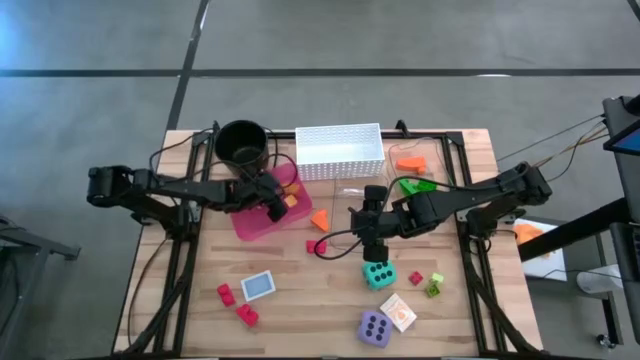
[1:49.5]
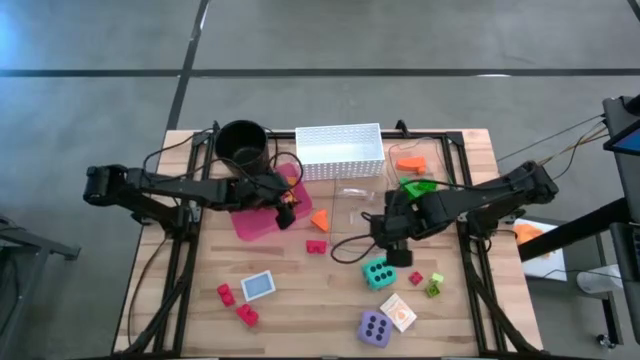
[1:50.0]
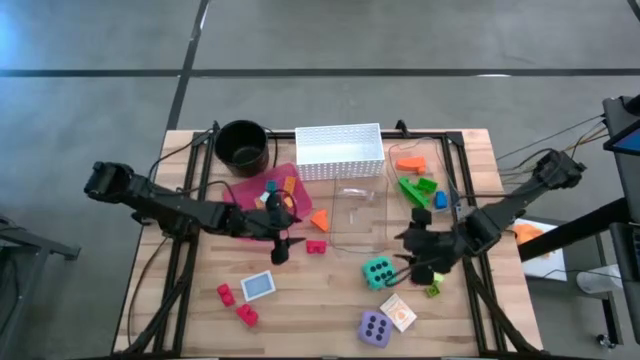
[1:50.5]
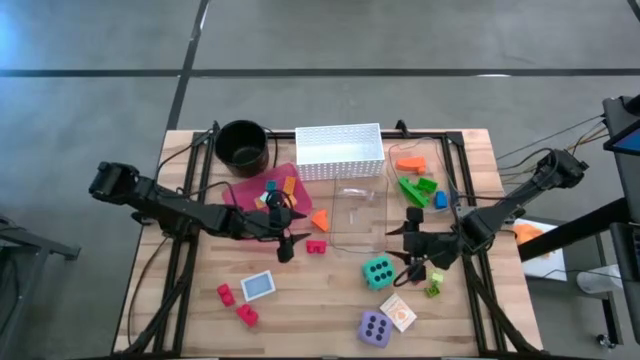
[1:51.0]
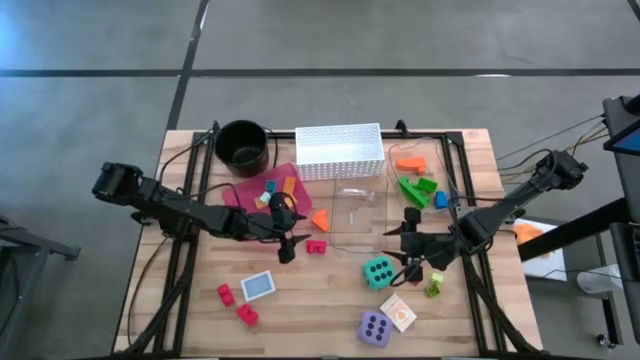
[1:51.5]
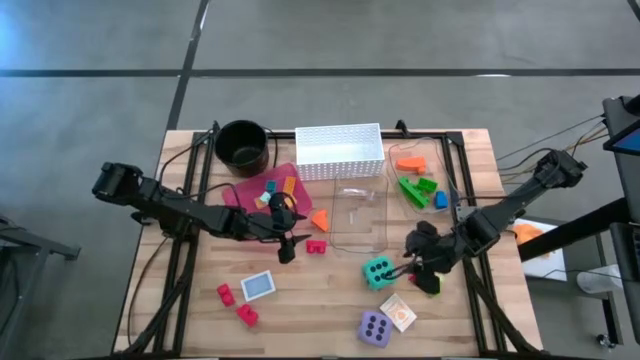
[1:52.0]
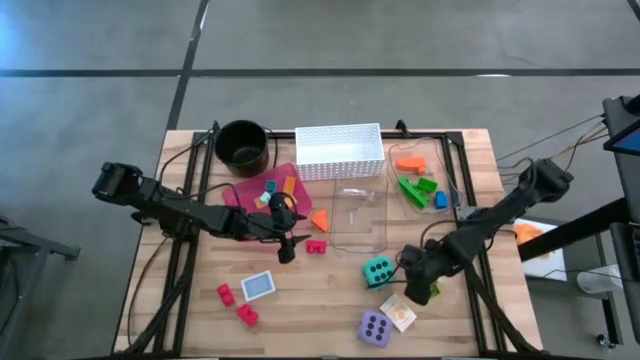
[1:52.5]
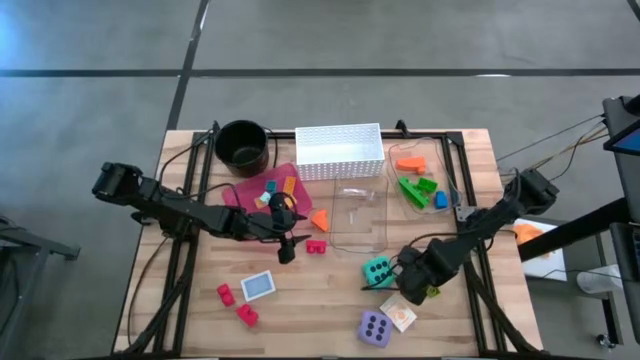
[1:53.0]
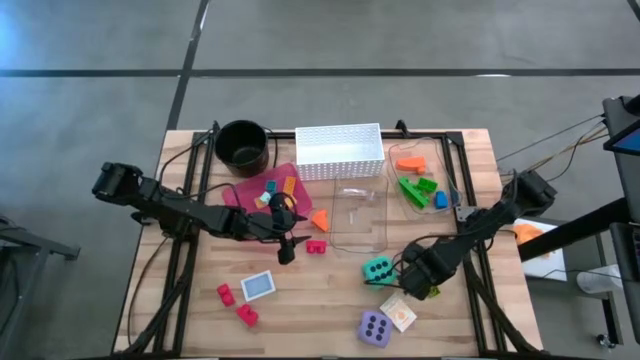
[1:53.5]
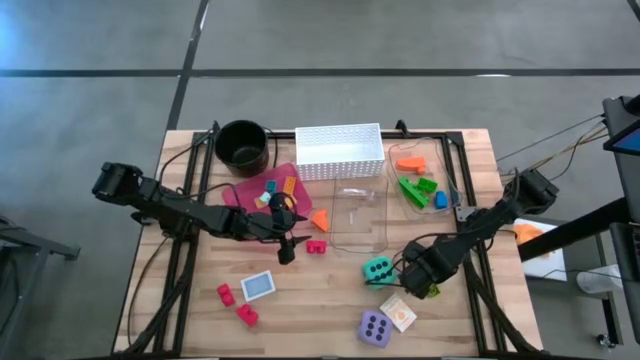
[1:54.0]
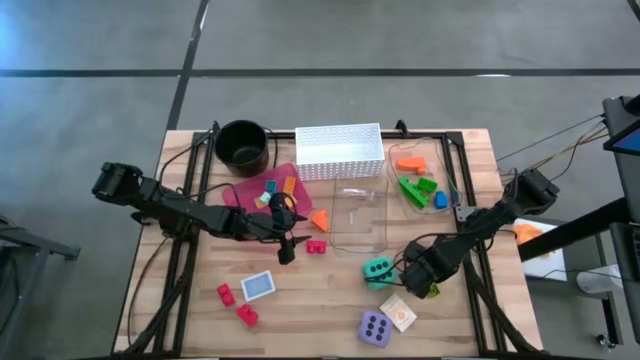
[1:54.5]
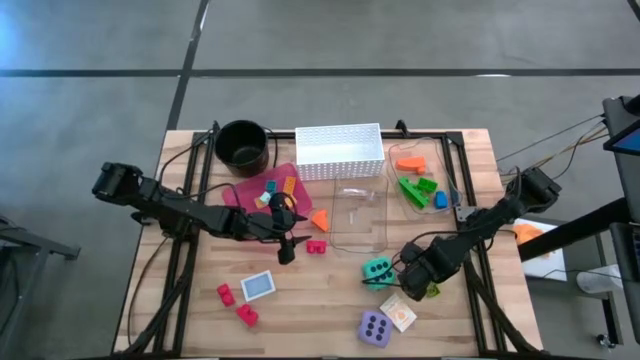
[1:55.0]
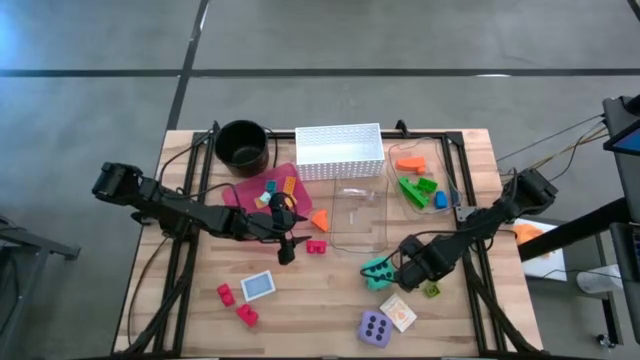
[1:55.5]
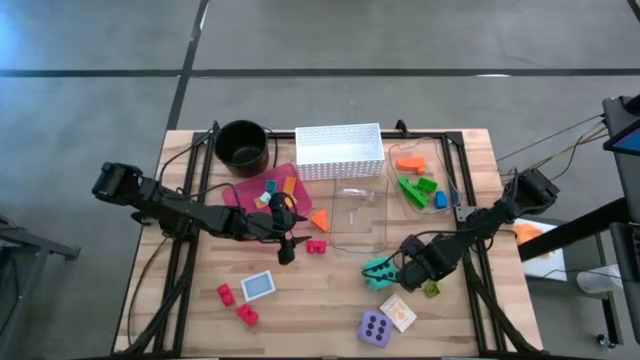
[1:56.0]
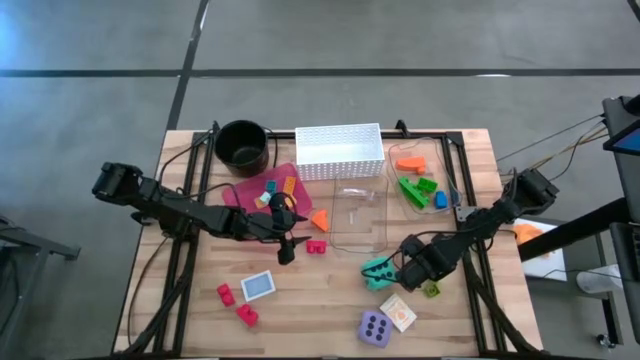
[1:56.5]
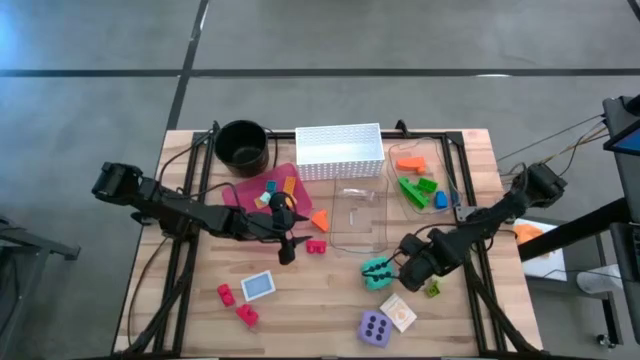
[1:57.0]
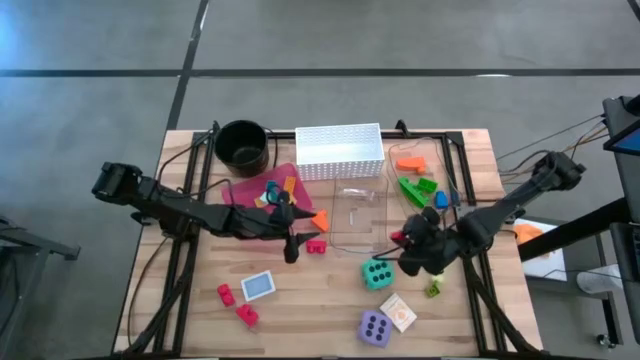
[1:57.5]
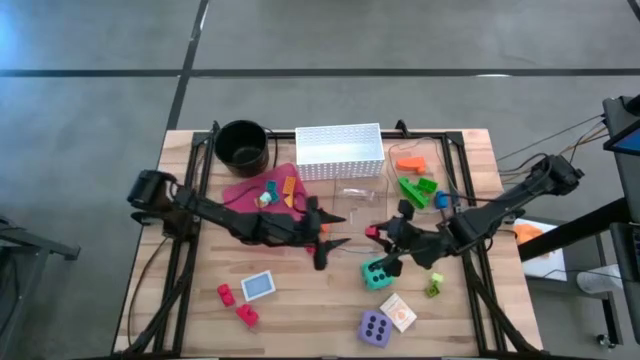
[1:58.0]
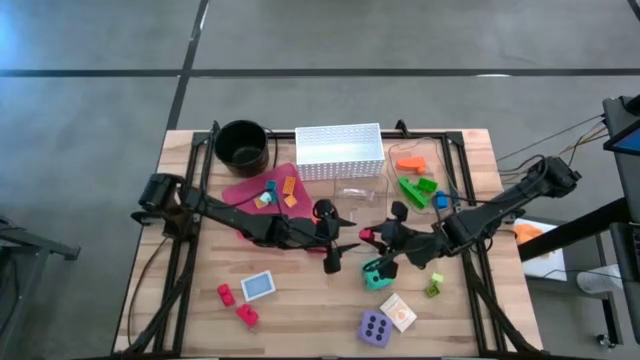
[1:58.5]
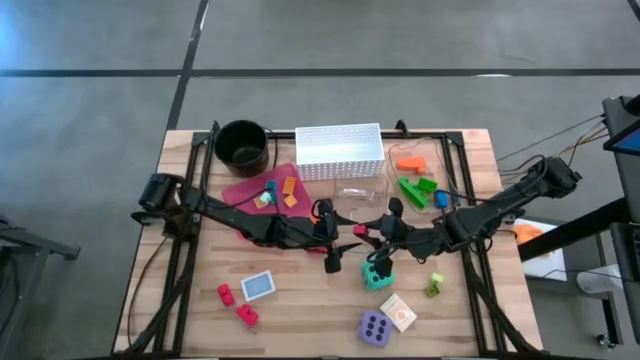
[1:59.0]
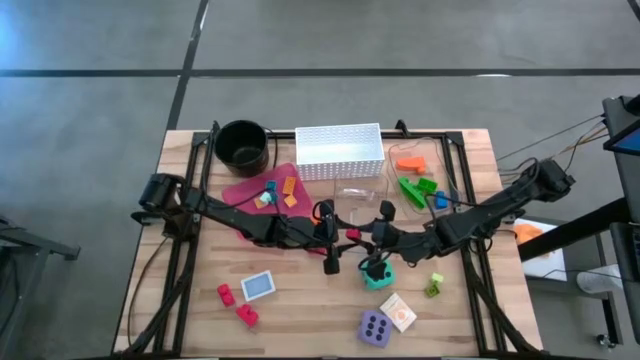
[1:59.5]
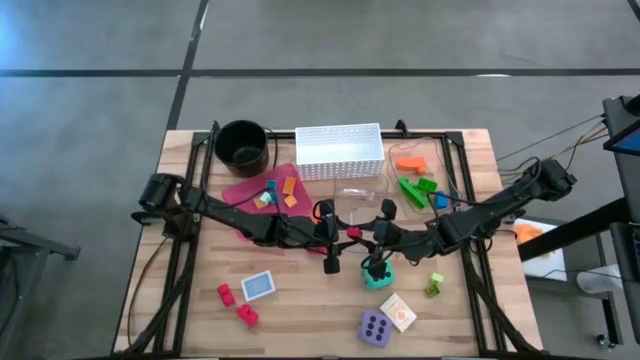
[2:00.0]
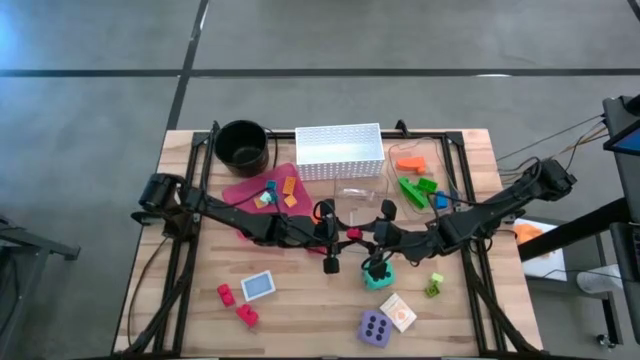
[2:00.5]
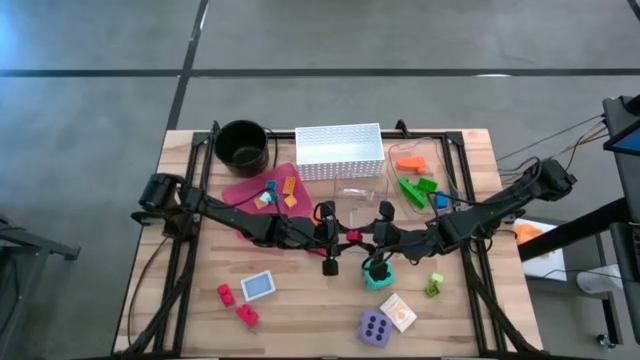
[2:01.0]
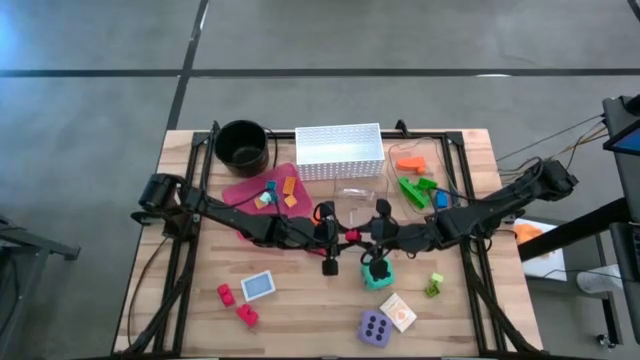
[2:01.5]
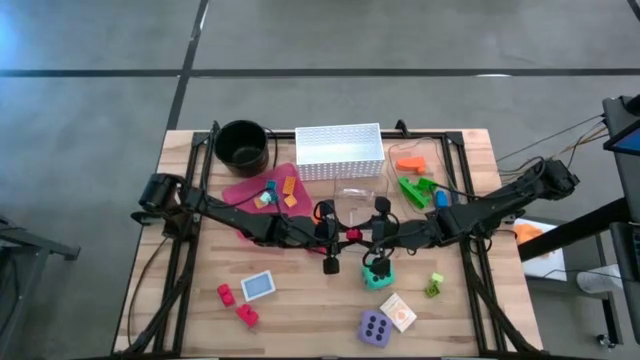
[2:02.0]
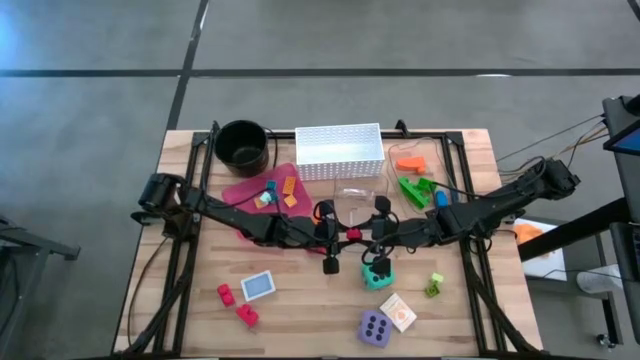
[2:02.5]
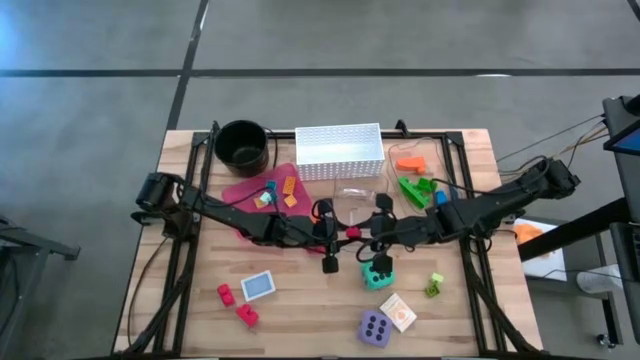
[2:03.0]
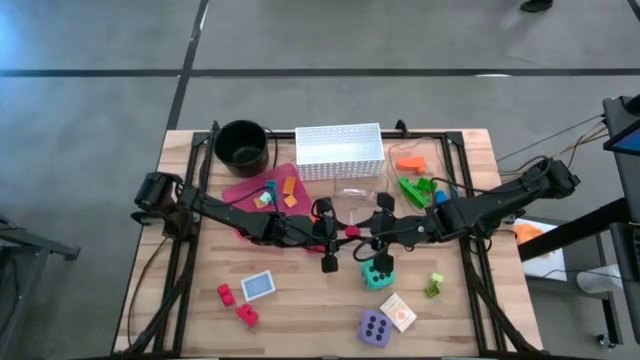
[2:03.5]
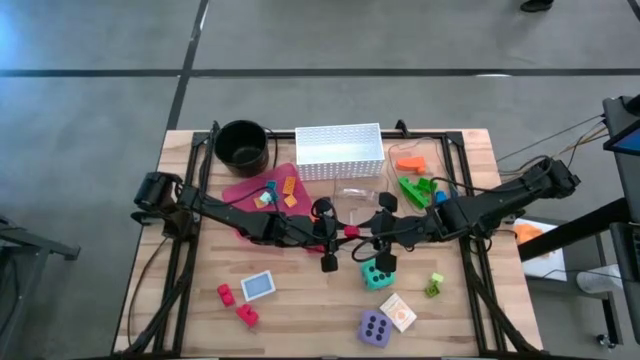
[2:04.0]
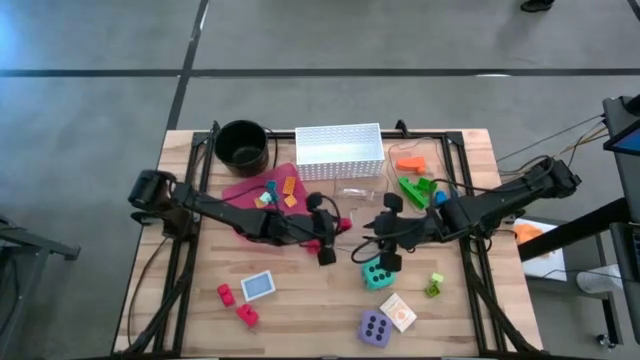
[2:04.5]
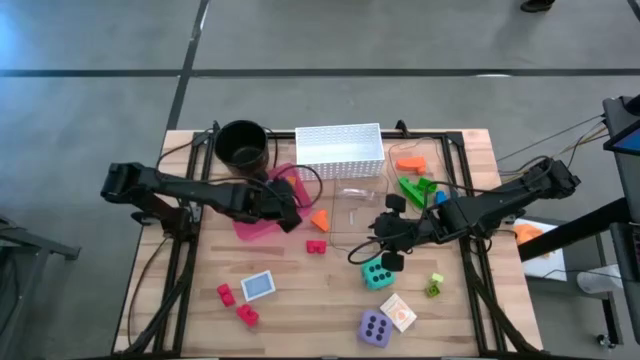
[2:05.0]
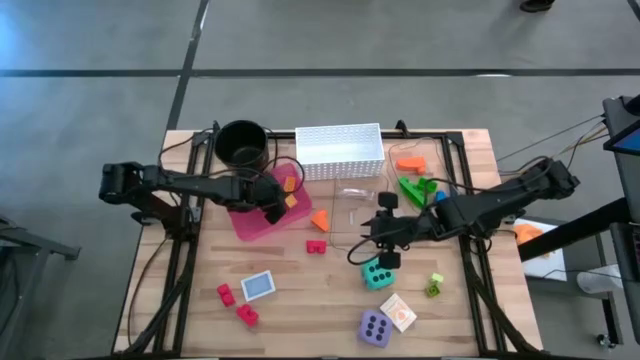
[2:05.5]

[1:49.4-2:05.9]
Task: Pick & Place Toys
Put the small red game piece into the red bin

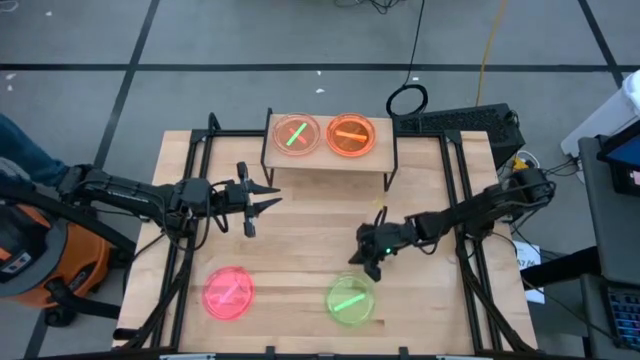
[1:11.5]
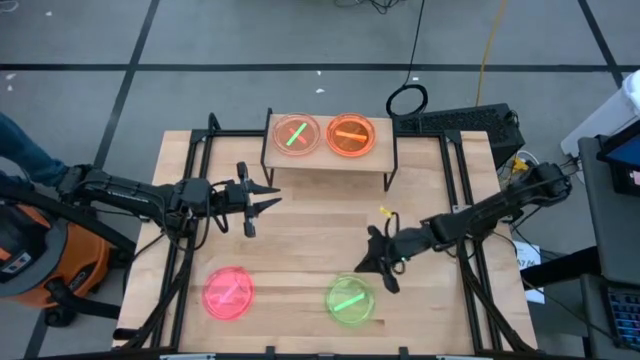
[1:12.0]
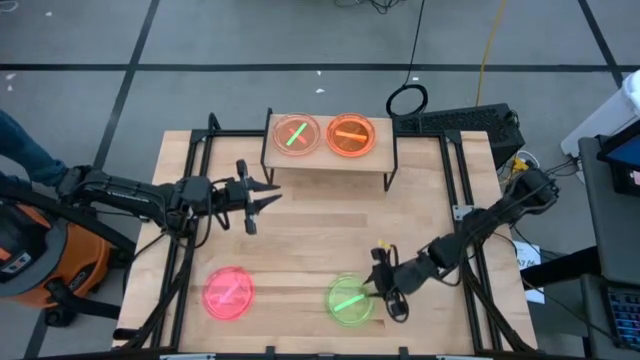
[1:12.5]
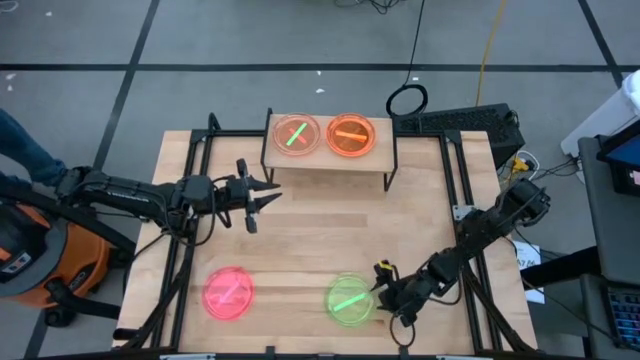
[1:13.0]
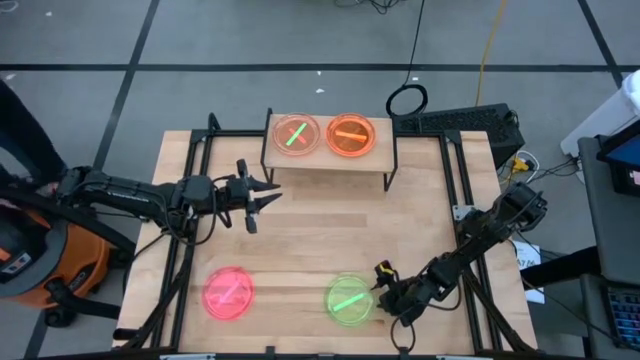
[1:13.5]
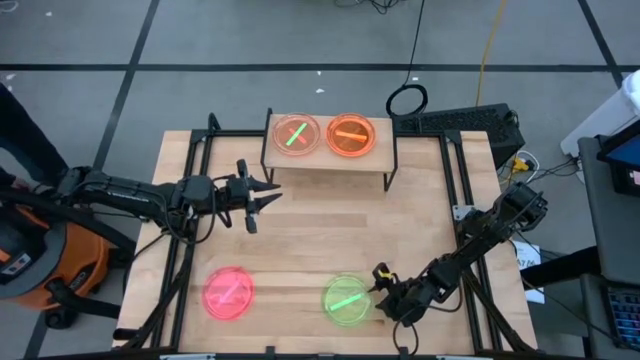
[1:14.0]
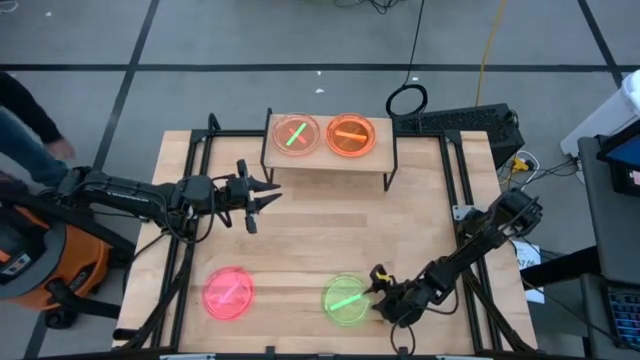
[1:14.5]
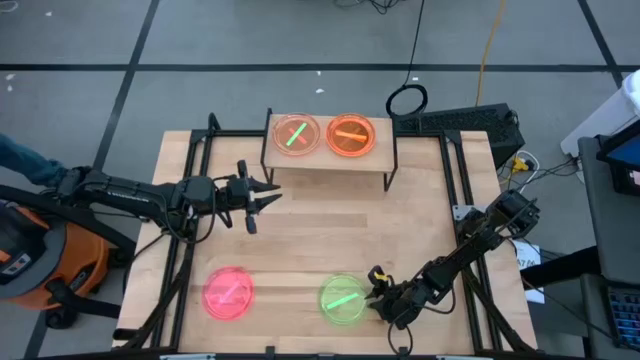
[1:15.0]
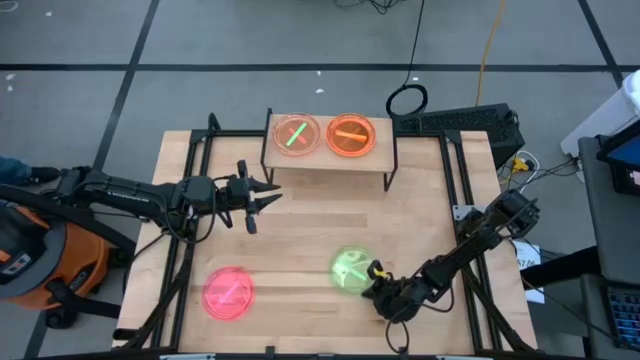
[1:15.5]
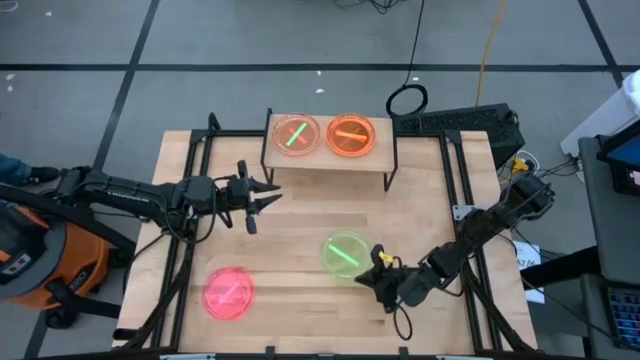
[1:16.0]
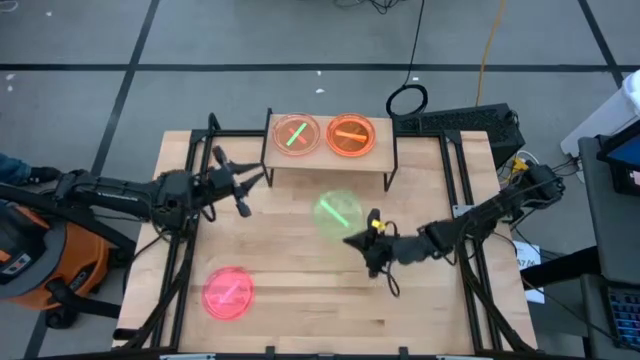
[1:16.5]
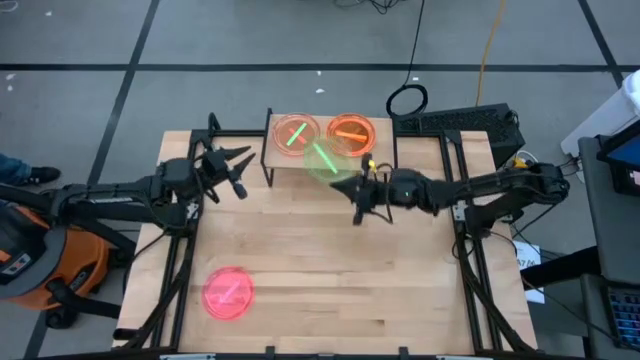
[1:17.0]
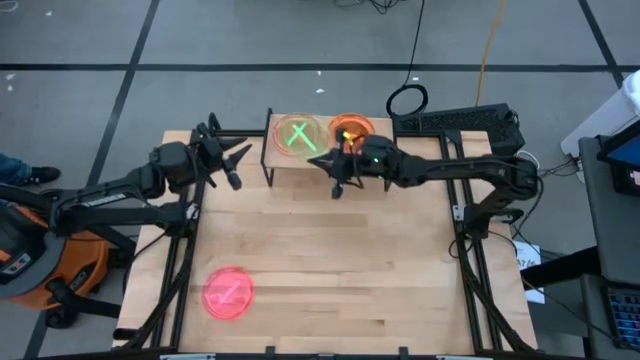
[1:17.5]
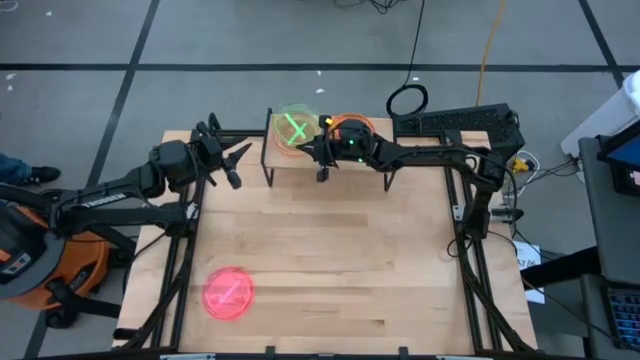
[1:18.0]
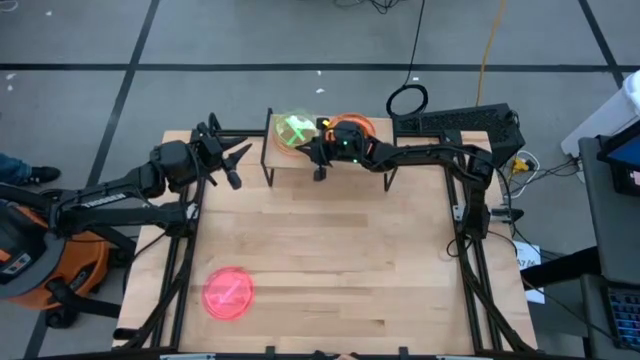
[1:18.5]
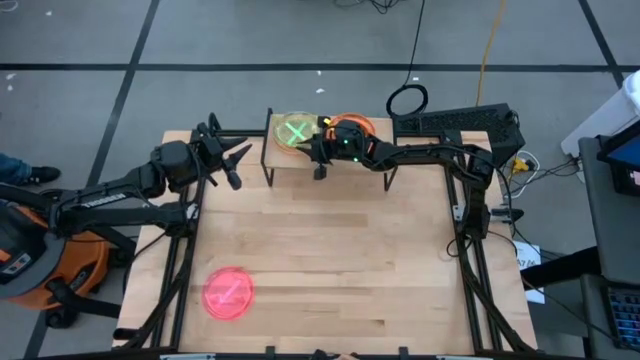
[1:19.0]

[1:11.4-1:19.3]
Task: Place and stack plates onto a shelf
Stack the green plate on top of the green plate on the shelf
